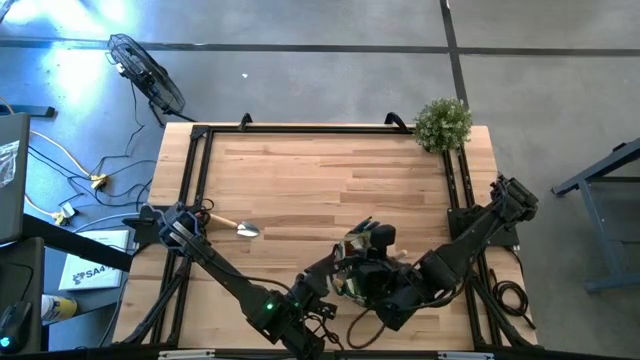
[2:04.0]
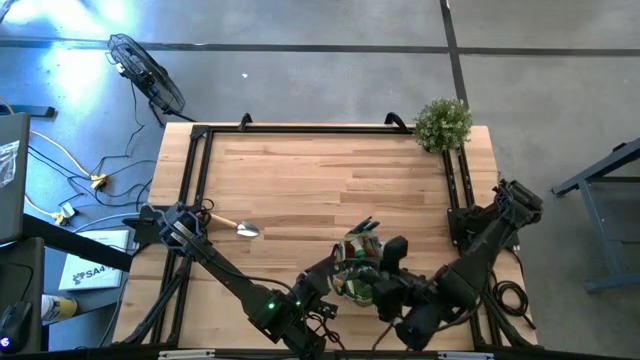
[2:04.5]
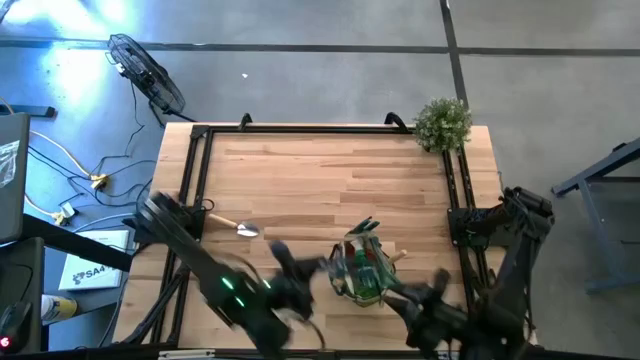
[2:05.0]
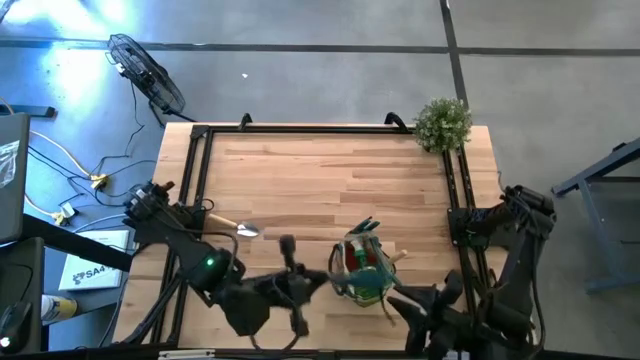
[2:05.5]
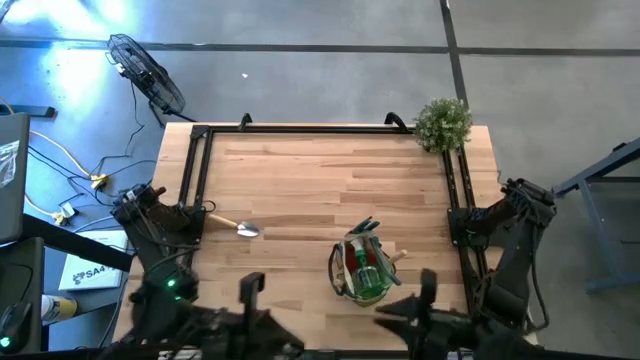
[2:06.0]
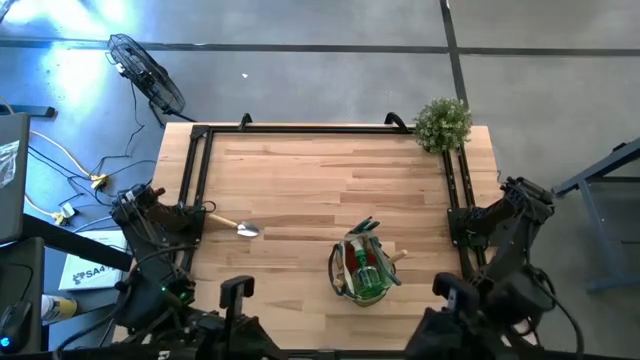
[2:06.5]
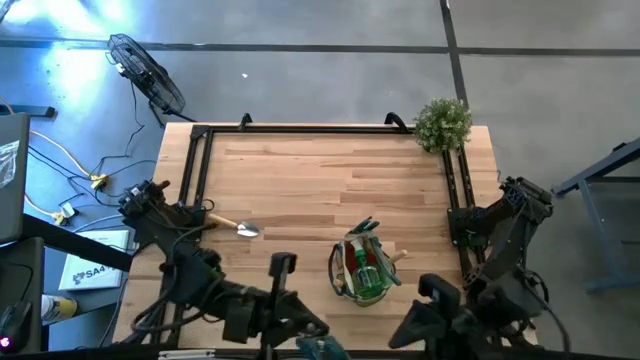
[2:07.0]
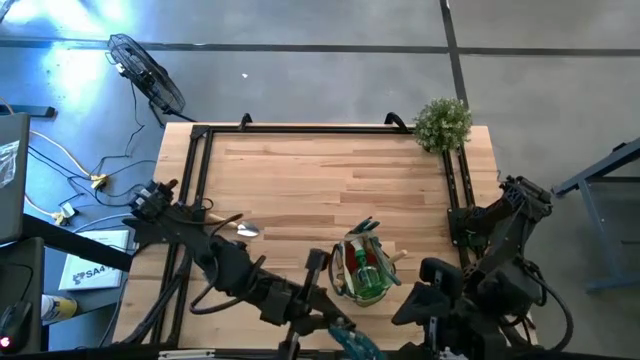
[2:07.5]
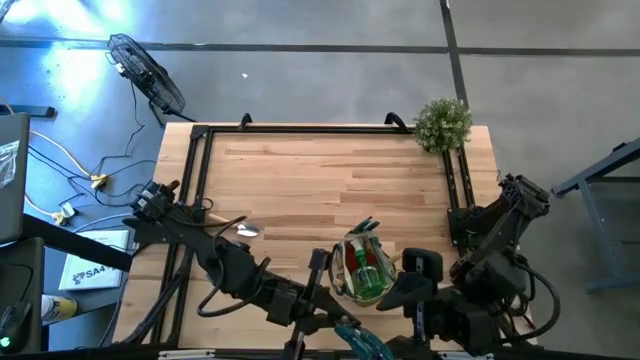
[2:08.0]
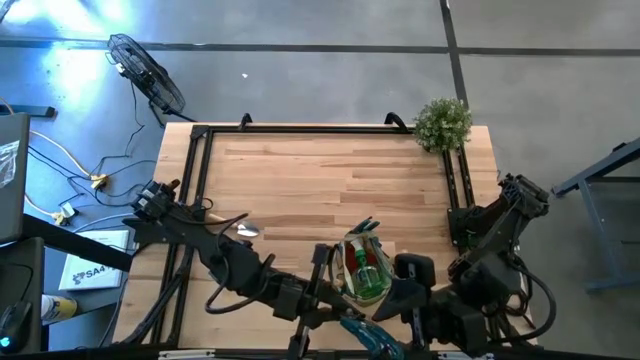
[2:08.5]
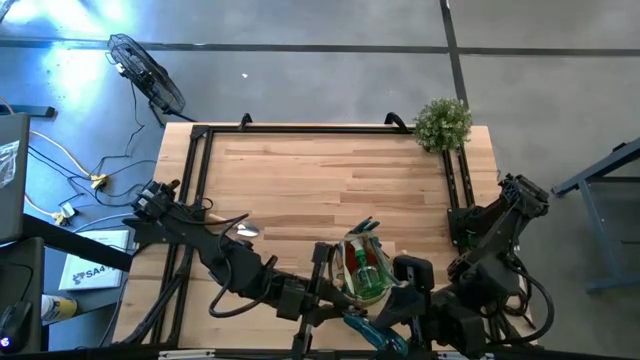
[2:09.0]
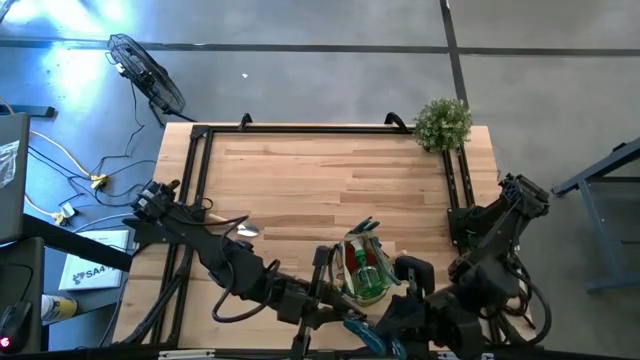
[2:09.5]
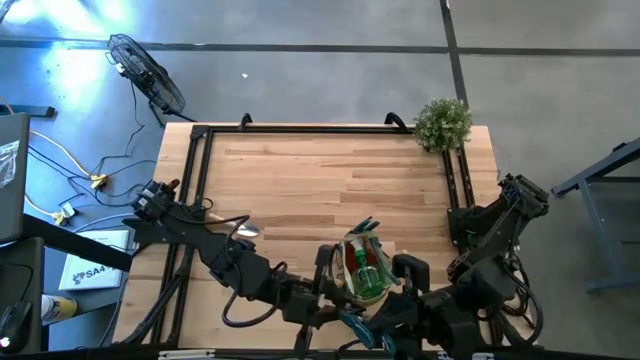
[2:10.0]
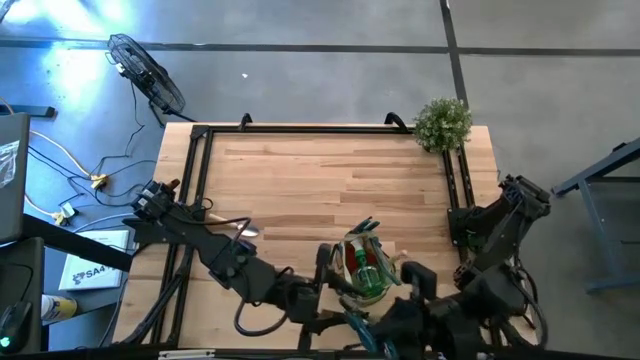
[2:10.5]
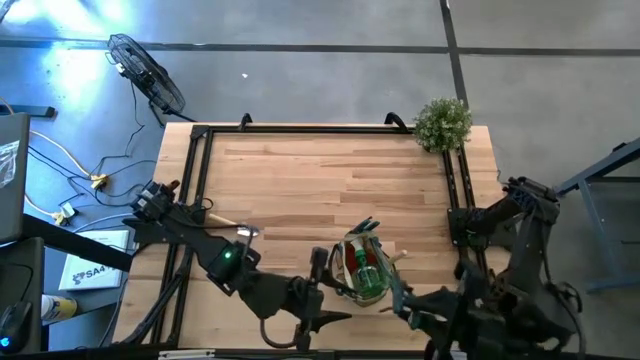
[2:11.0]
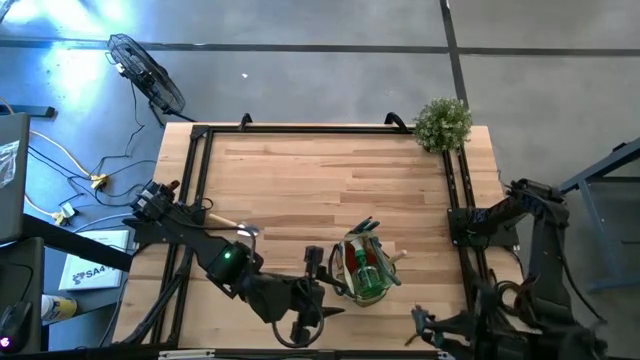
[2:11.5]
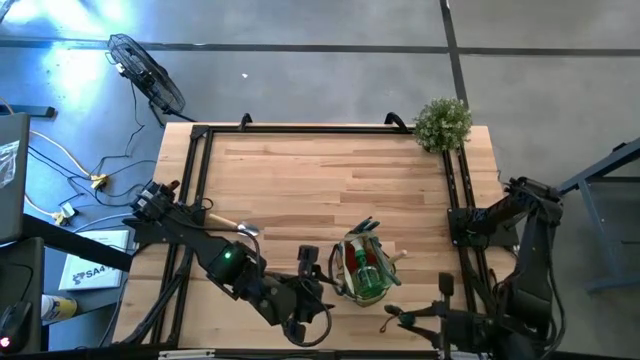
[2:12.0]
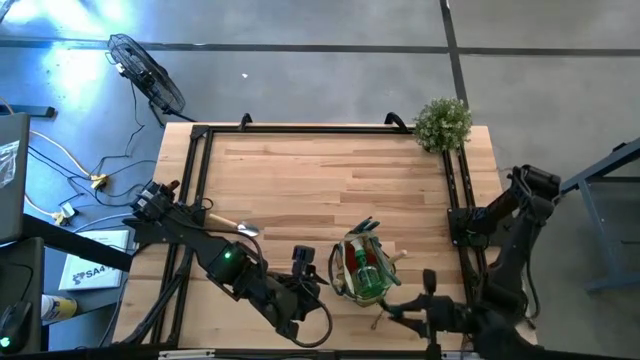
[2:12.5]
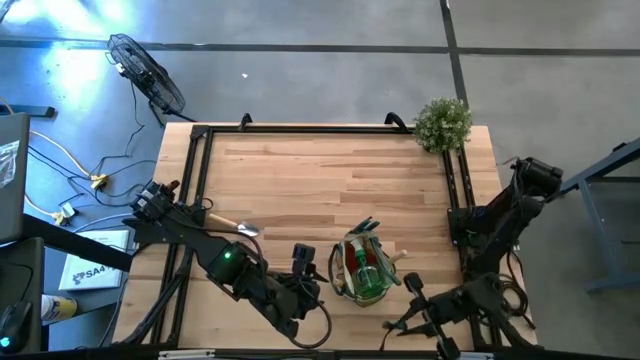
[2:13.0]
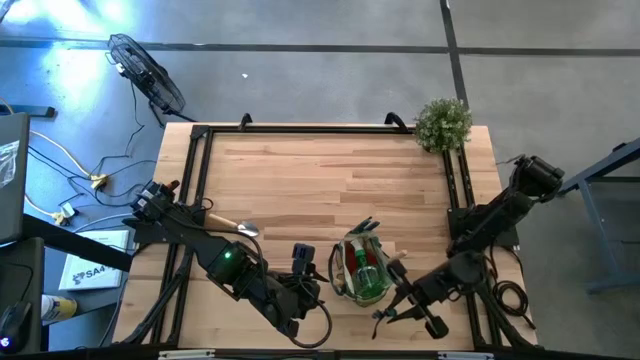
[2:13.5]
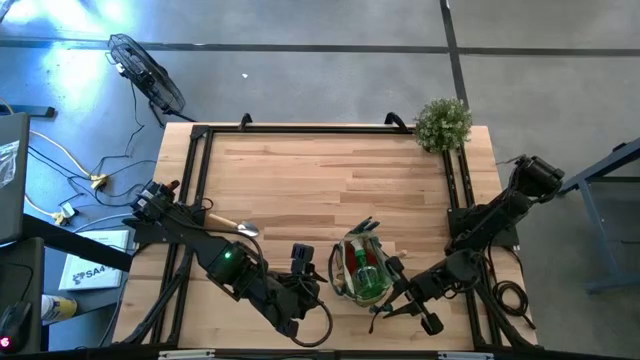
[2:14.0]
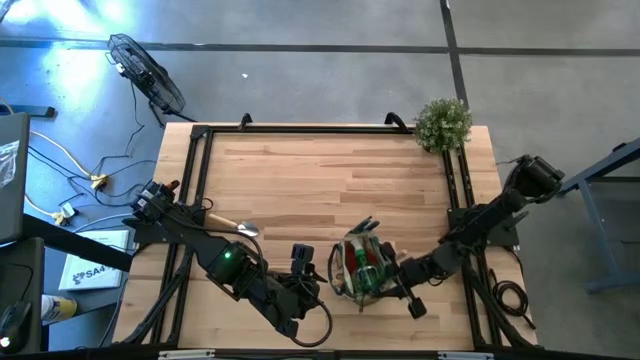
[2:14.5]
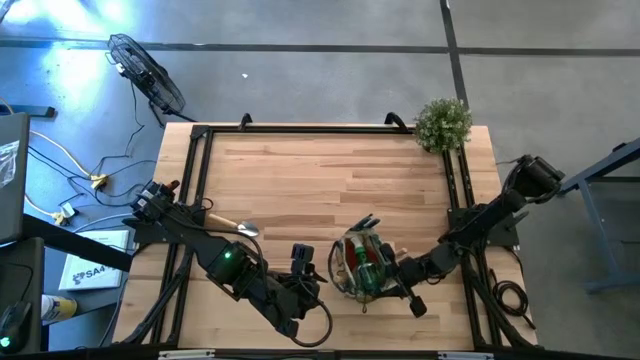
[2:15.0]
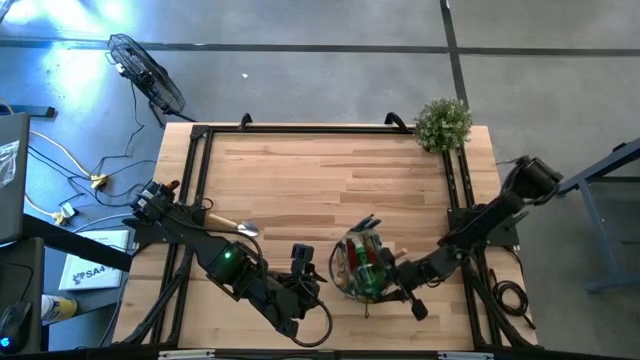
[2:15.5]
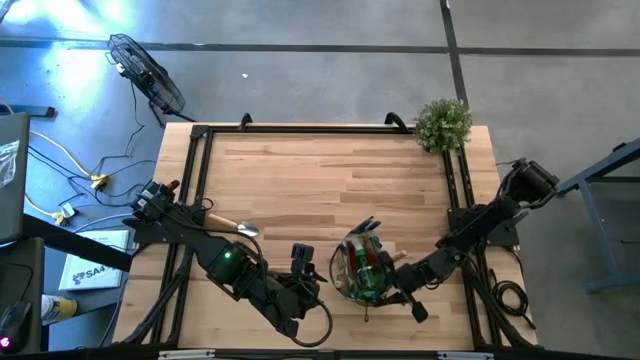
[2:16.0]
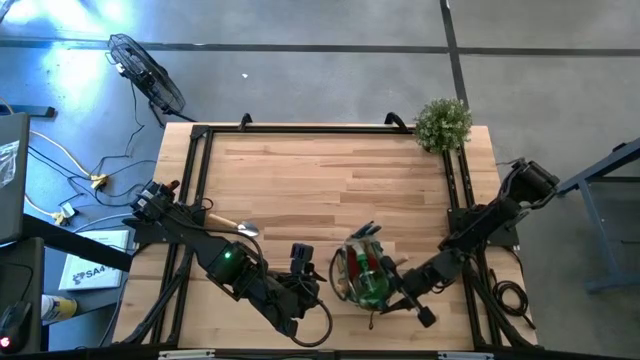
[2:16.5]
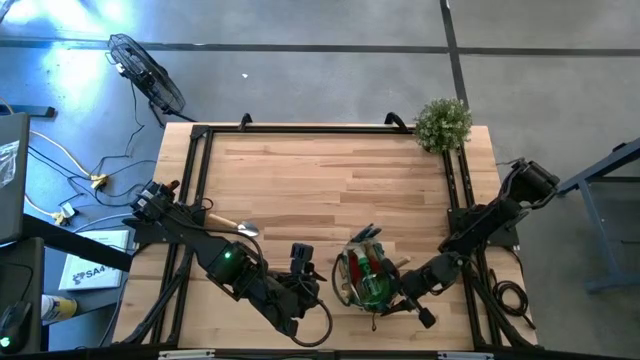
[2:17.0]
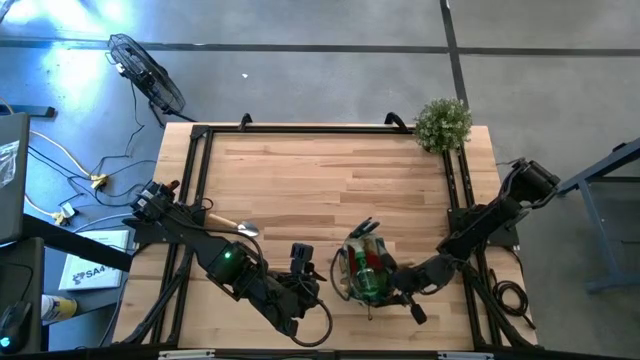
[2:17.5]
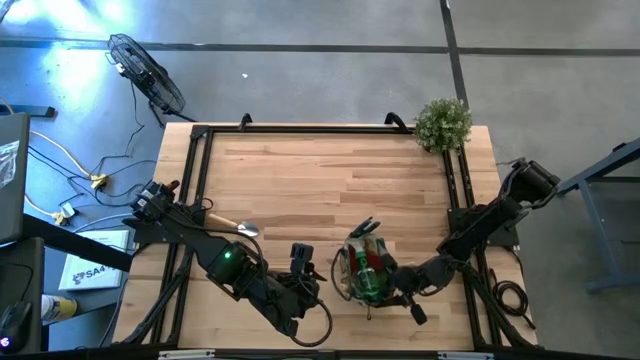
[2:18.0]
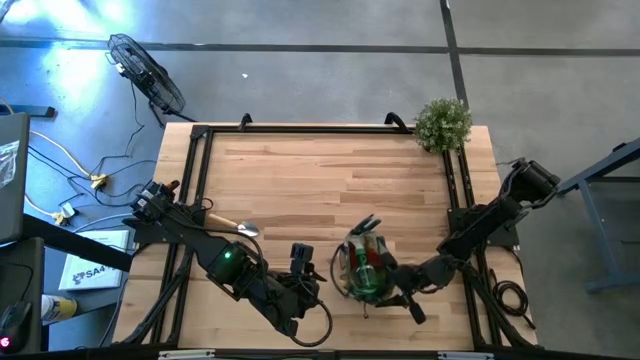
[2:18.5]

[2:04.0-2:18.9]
Task: Pick & Place Garden tools in Gardening bag
Put the green shear scissors into the gardening bag

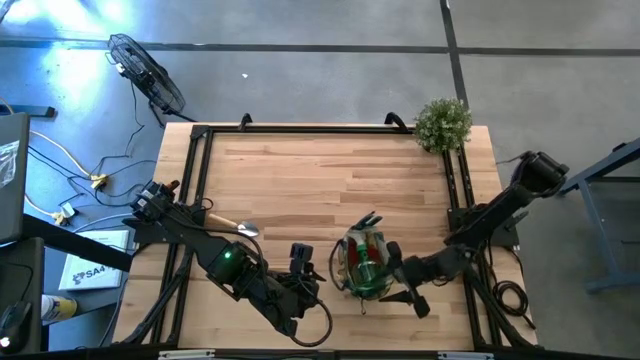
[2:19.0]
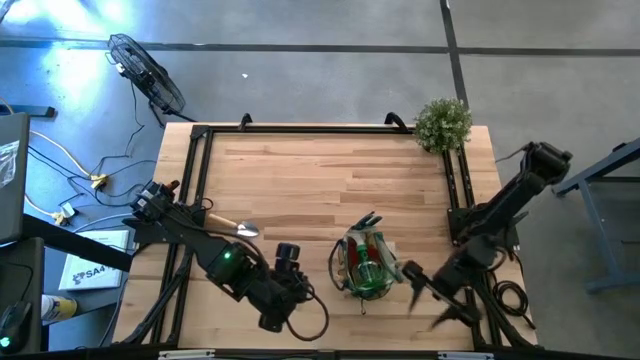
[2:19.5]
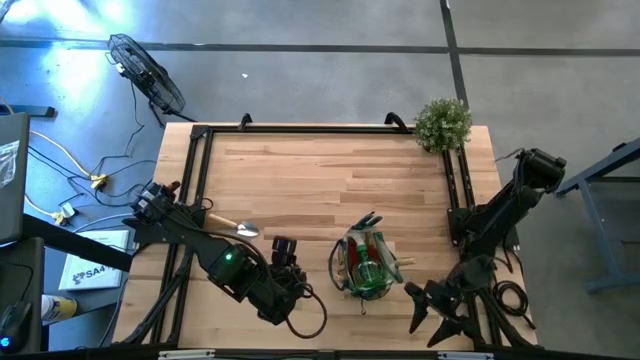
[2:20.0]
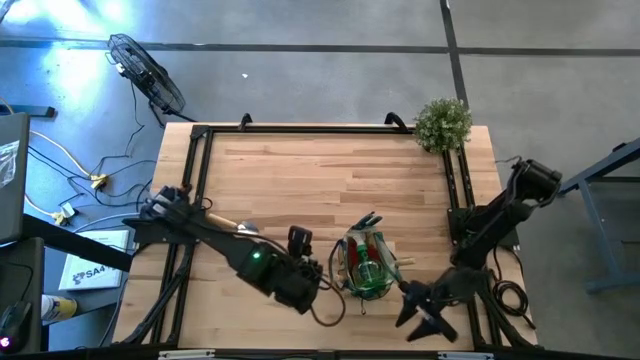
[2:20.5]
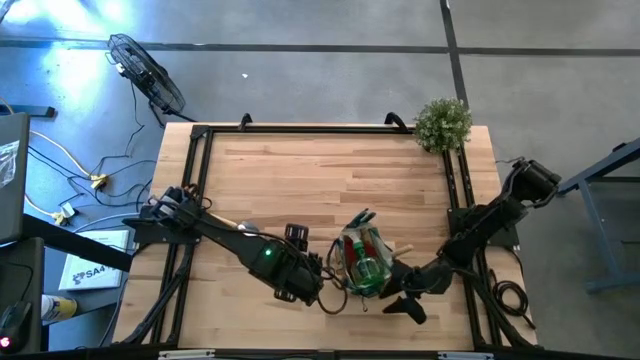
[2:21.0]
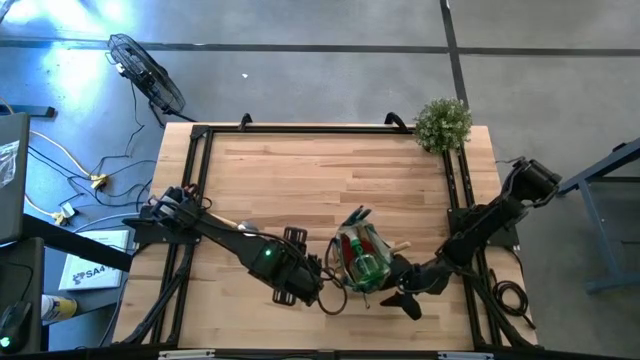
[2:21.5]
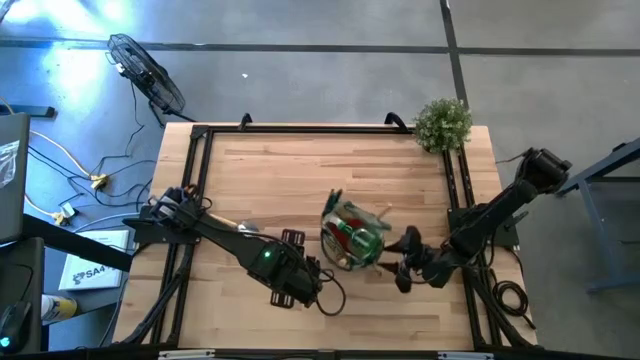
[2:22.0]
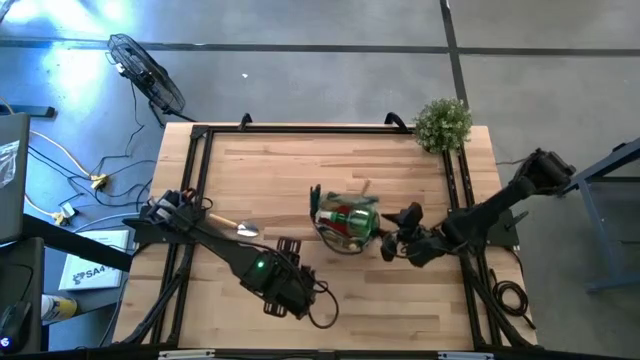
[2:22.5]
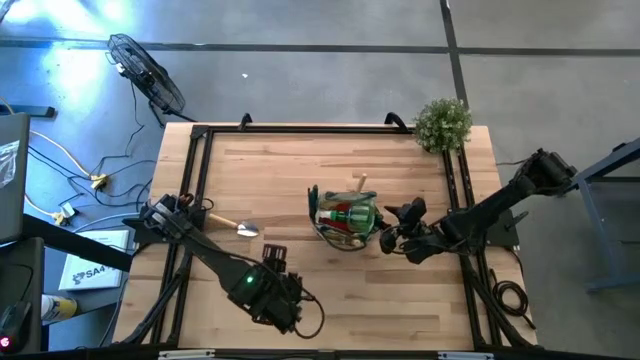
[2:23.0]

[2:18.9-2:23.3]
Adjust the gardening bag

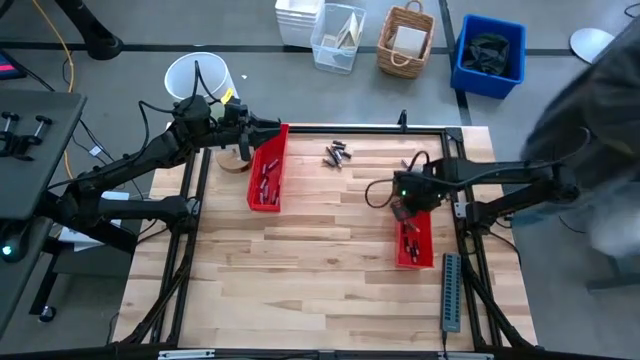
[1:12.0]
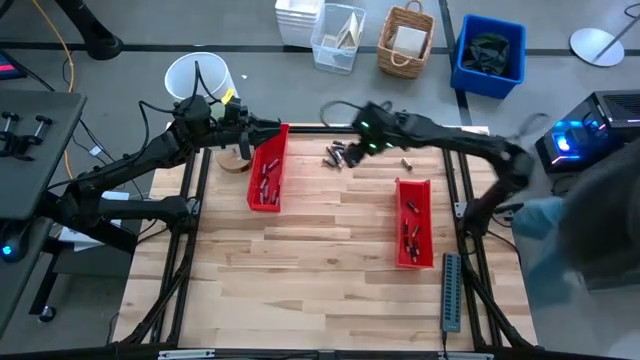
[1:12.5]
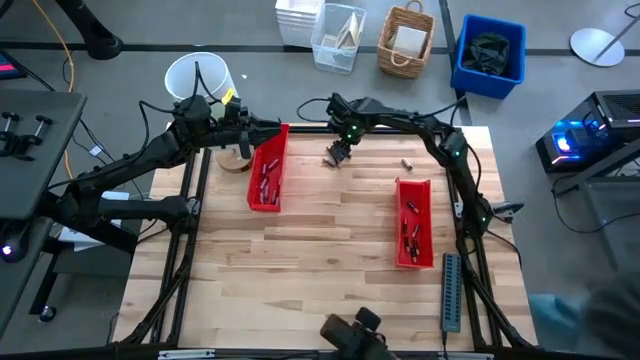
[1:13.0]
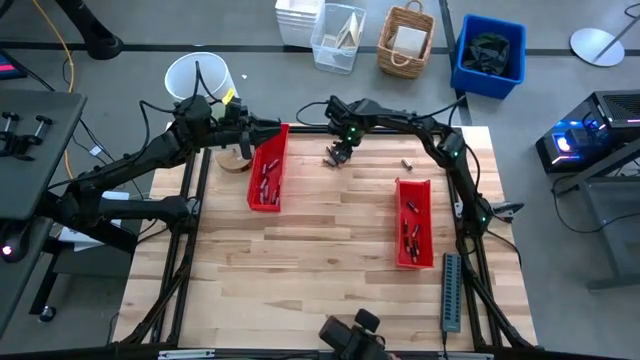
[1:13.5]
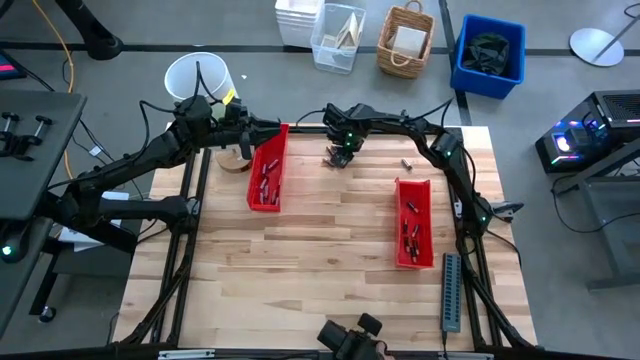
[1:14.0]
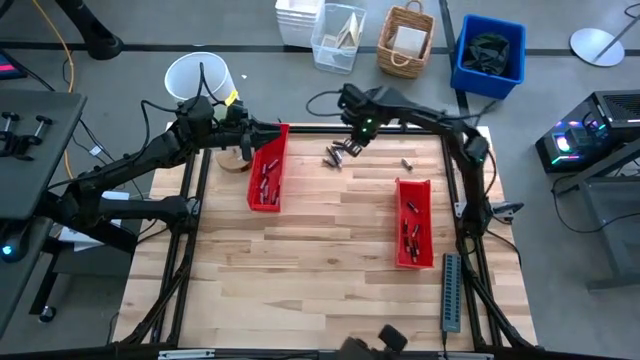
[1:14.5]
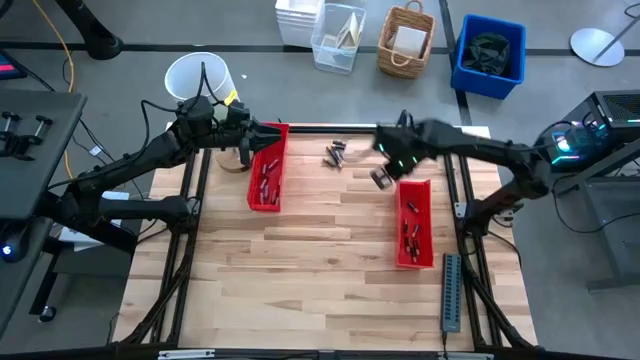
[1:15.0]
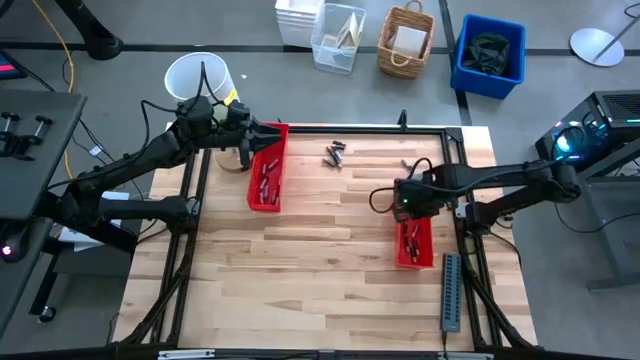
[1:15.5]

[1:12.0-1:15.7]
Task: Sort batteries
Put the black battery into the bottom red bin
